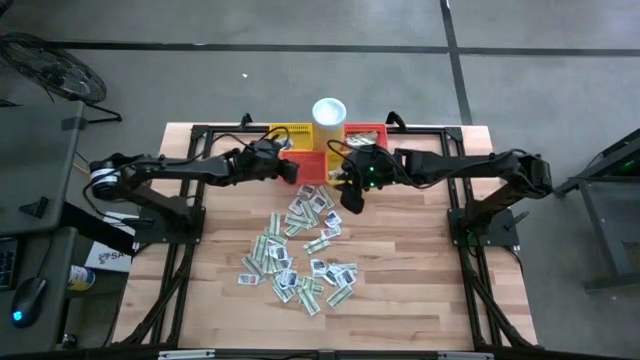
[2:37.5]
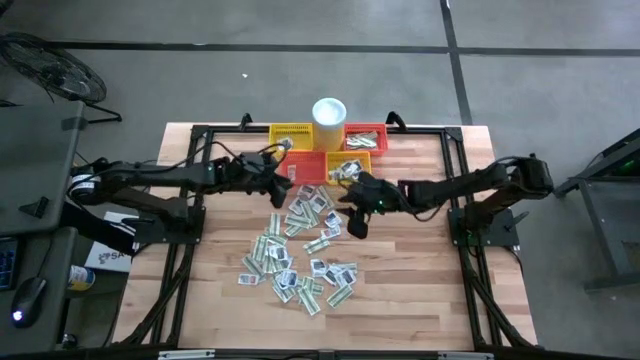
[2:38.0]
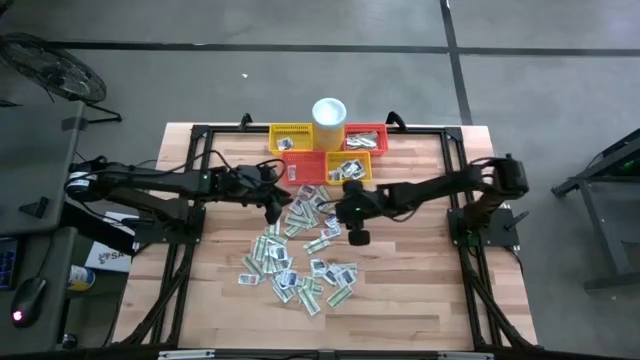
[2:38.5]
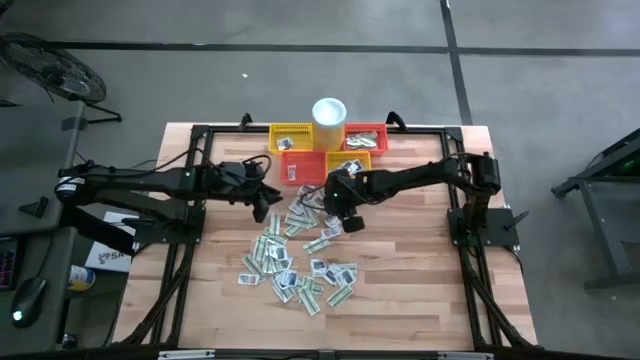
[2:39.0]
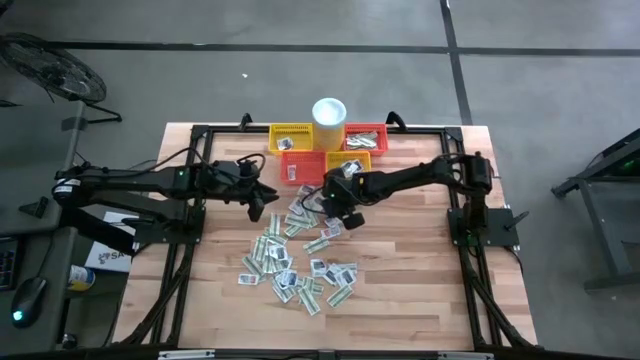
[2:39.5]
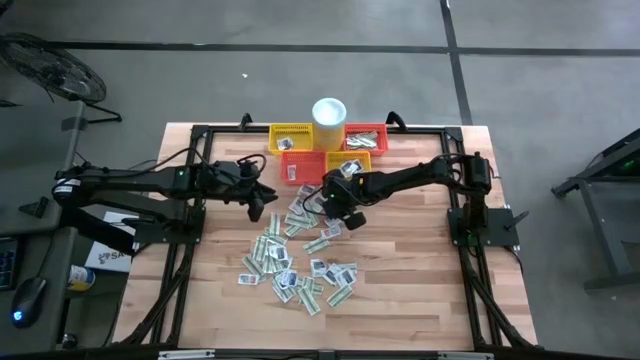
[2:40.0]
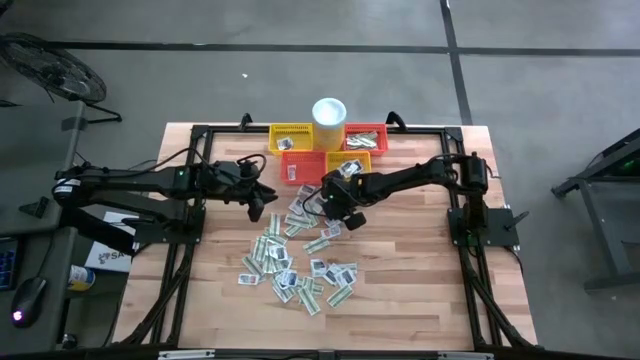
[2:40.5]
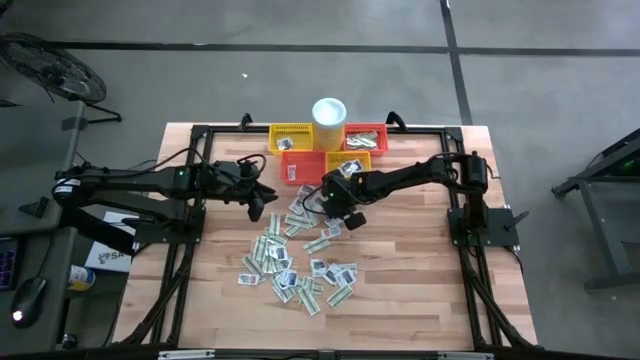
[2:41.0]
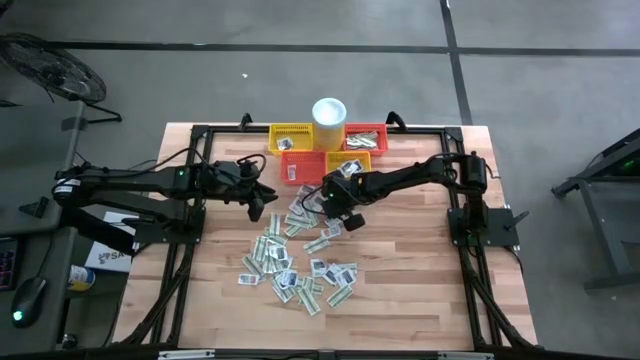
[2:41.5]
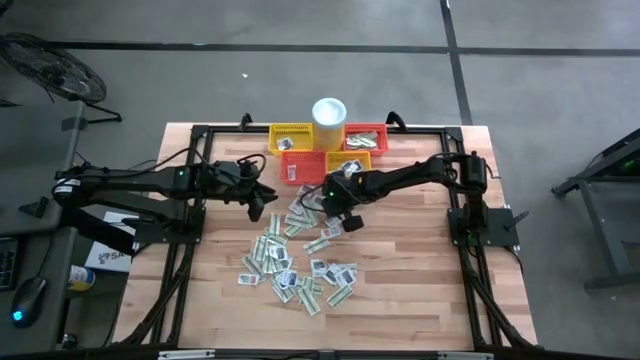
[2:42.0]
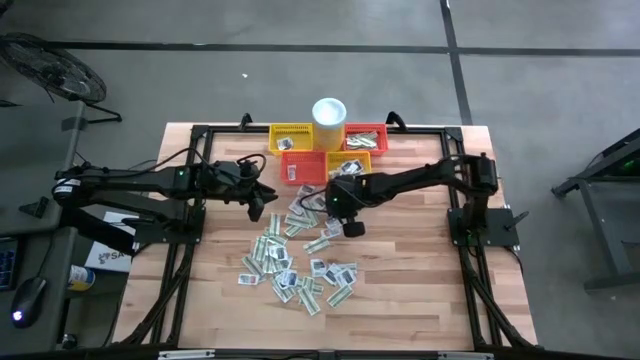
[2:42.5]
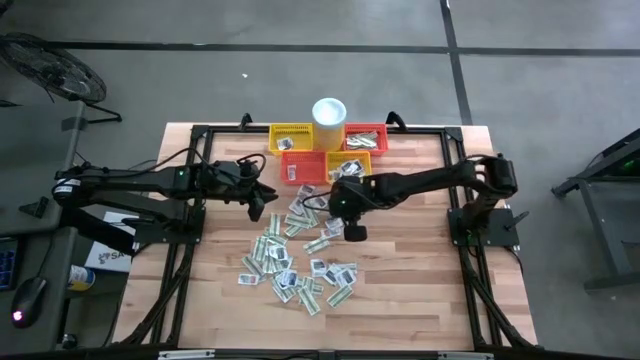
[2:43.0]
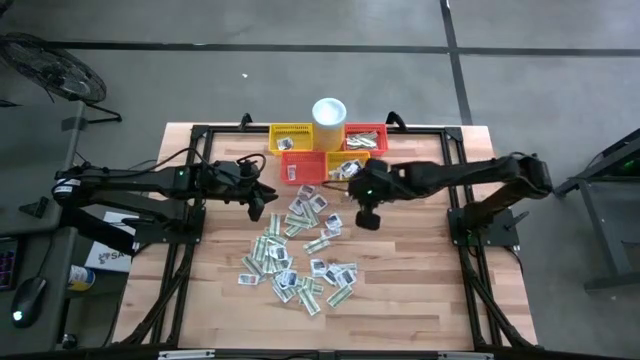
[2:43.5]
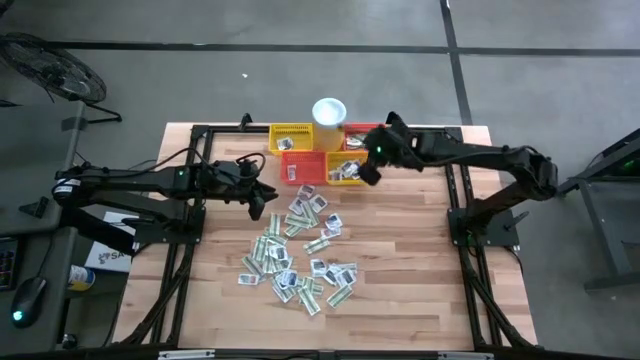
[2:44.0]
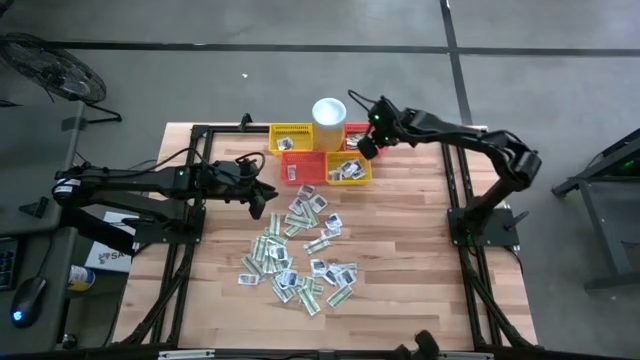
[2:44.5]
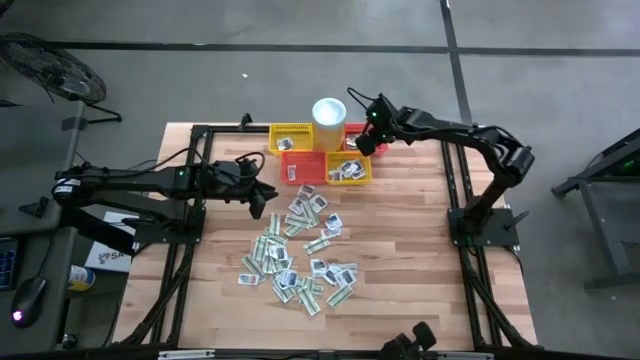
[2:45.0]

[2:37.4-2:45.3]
Task: Pick & Place First Aid Supplies
Put the green bandage pack into the top orange basket

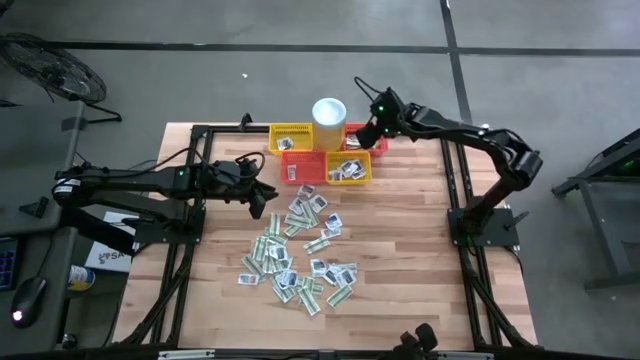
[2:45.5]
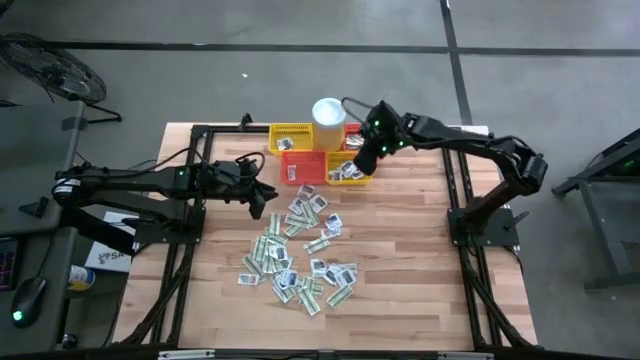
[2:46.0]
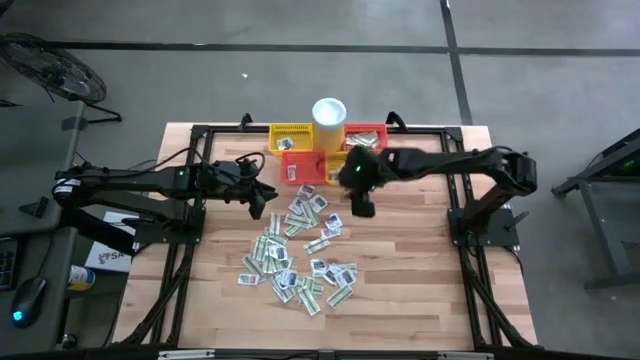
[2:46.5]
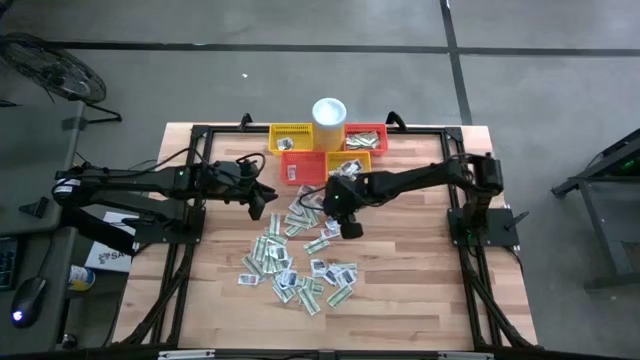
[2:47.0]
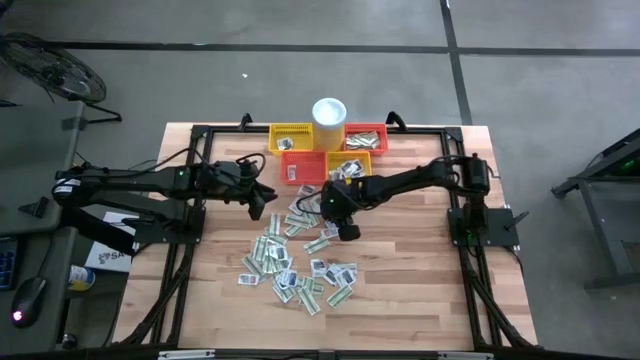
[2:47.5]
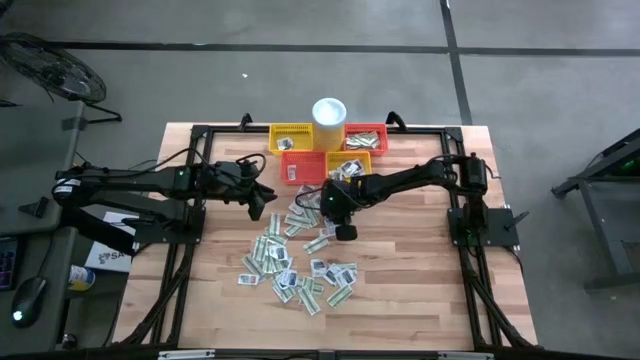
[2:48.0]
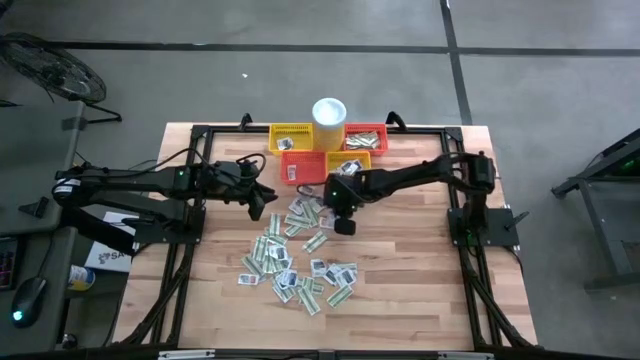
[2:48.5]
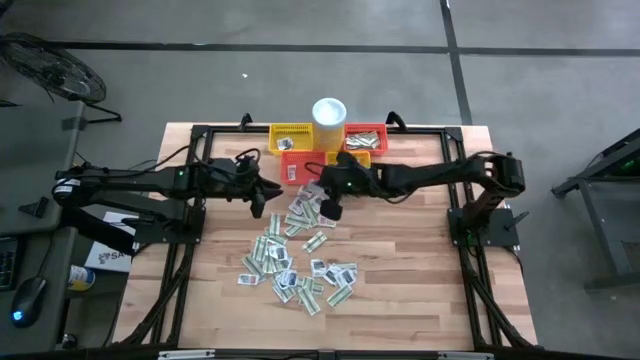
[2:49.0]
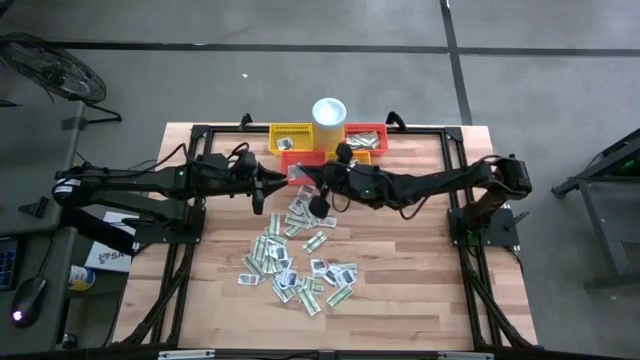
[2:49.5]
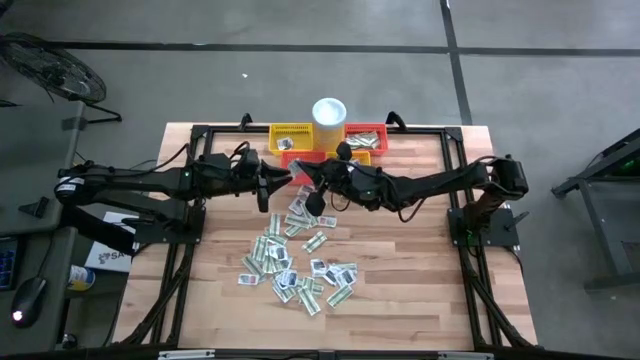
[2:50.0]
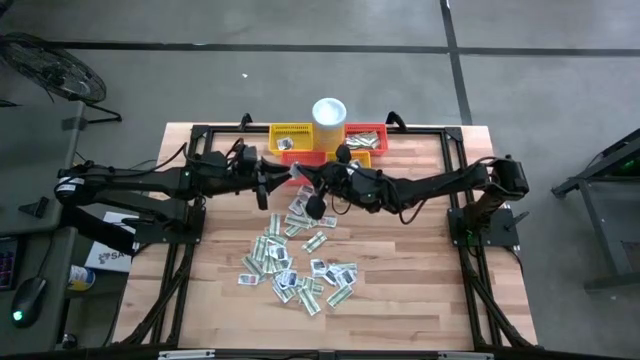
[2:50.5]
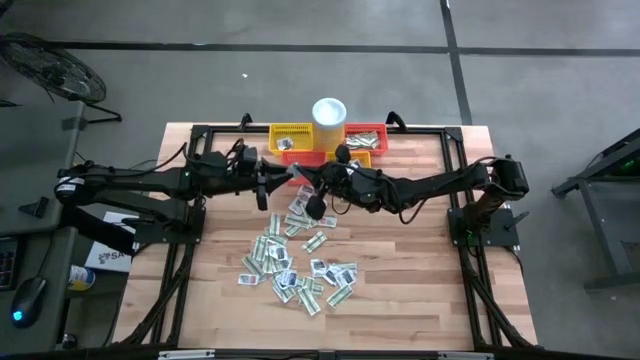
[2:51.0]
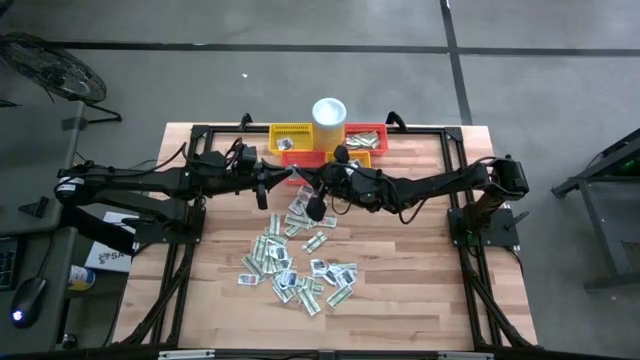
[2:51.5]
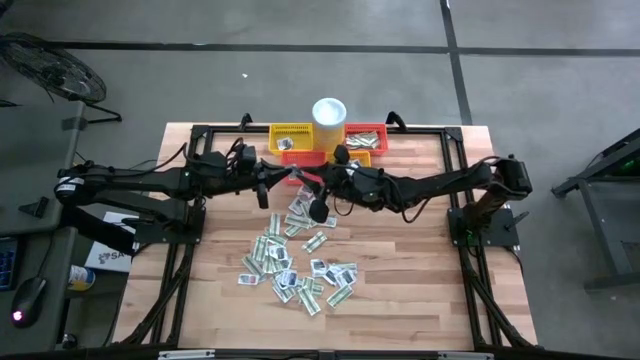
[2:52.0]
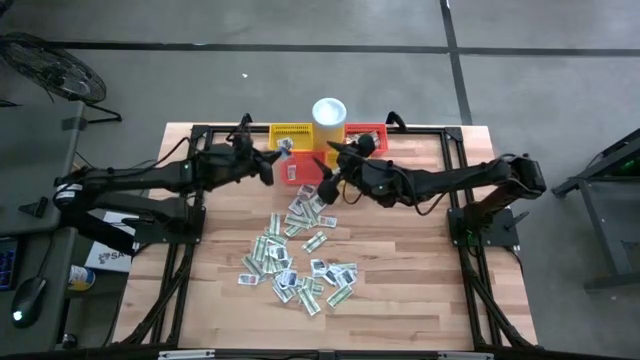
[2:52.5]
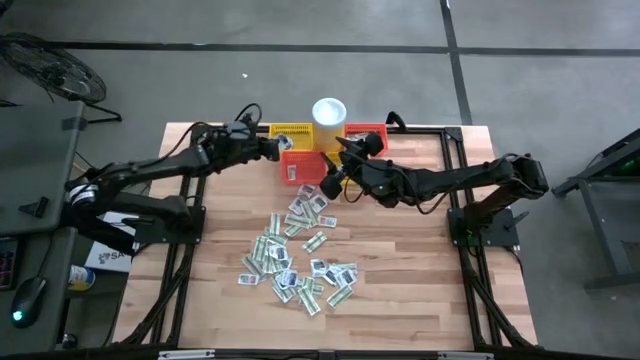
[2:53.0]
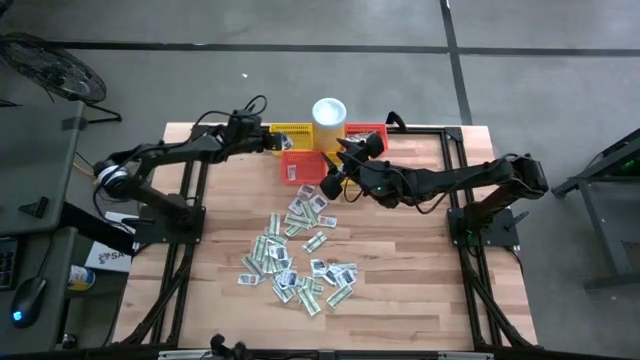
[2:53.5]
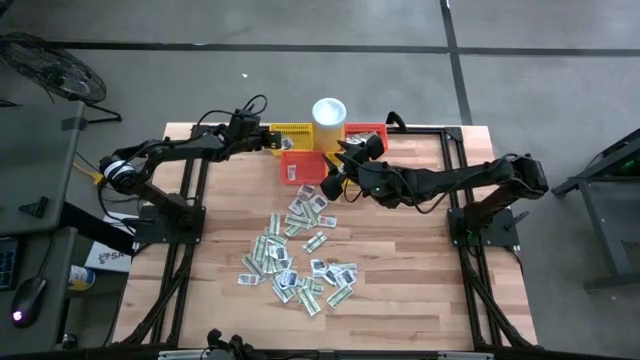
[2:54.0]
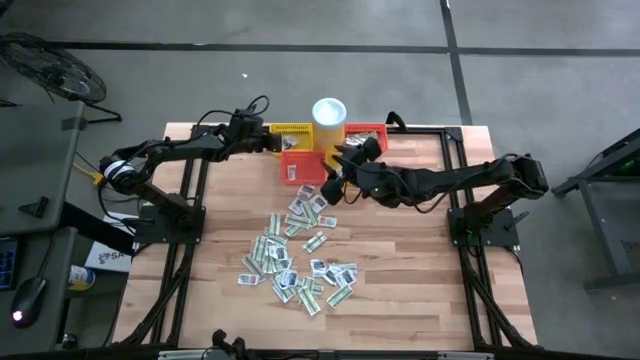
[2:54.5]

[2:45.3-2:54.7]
Put the blue alcohol pad into the top yellow basket
